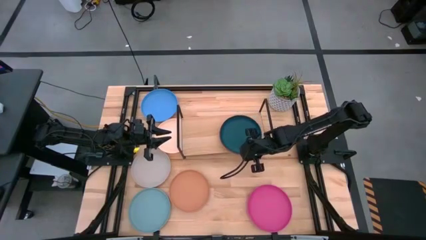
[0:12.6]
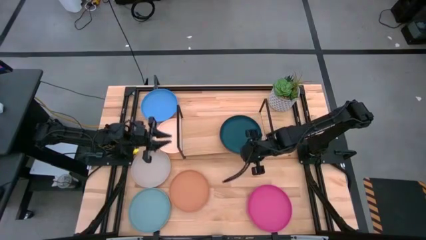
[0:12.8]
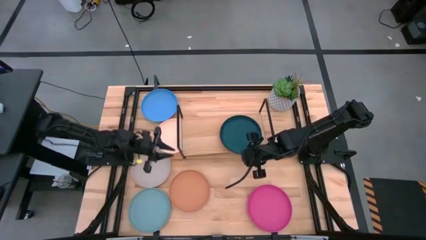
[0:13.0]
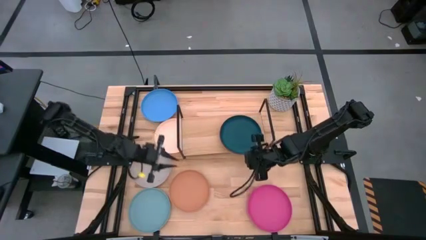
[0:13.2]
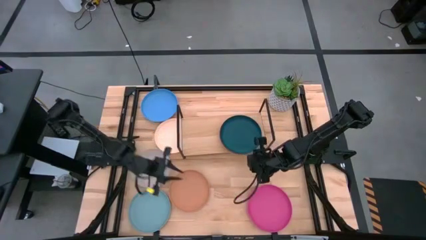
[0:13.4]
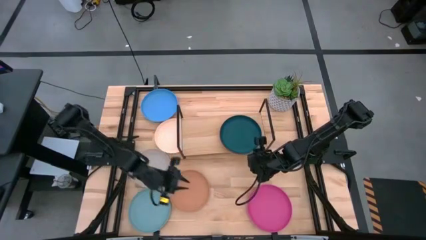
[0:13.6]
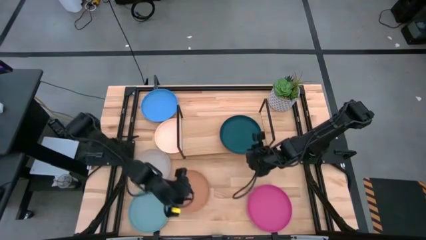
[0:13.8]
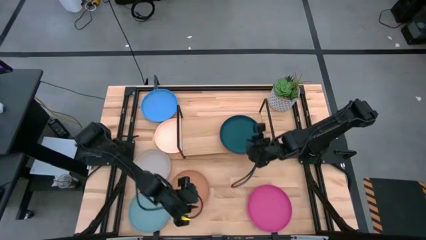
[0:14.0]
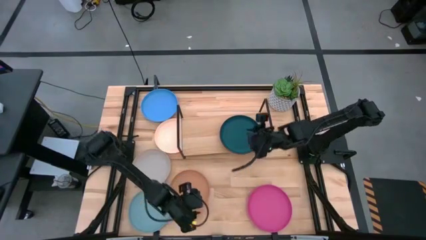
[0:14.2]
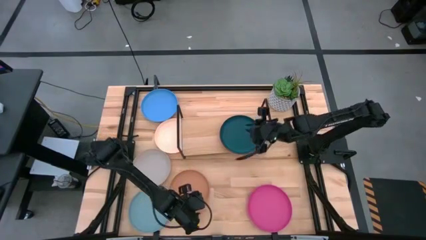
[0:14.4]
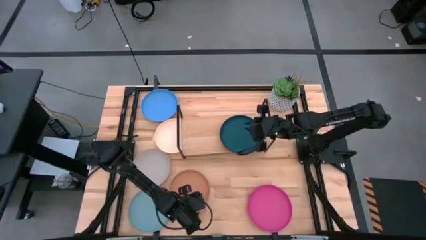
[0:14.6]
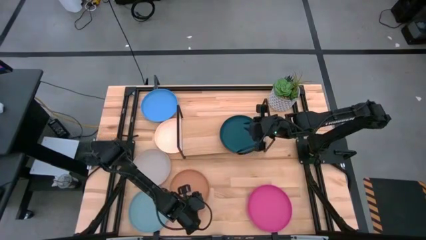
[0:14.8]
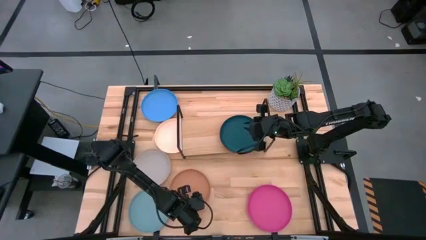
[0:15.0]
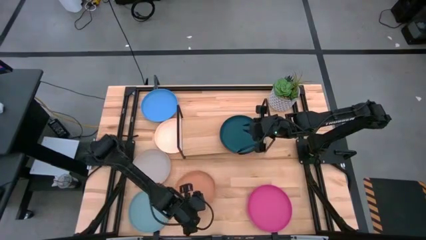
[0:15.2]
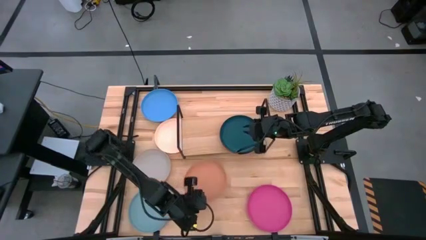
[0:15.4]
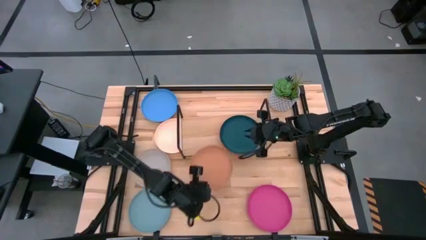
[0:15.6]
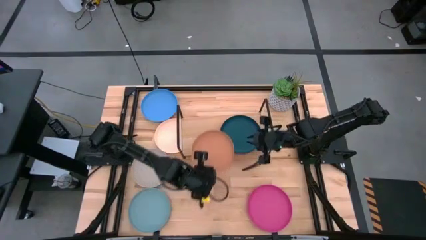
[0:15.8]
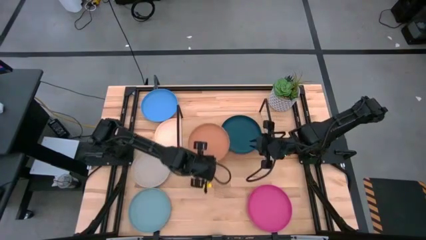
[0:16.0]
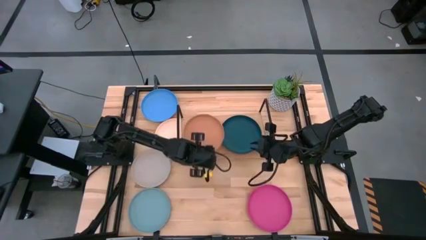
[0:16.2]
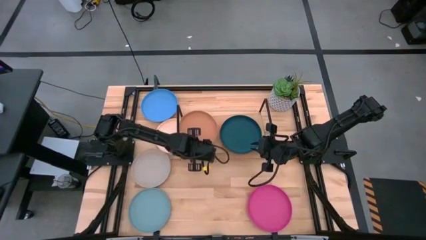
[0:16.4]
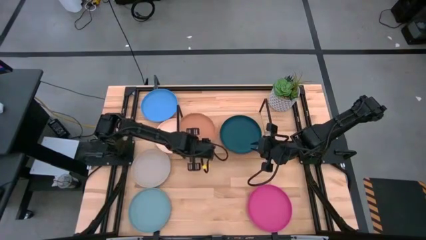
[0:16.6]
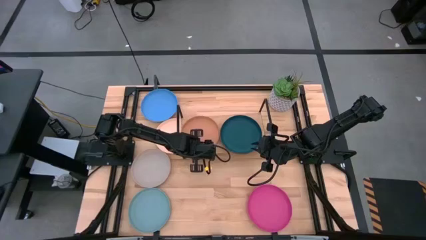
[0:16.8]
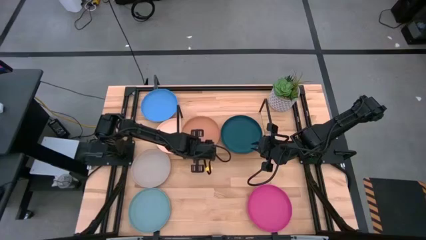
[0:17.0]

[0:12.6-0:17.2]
Task: Place and stack plates onto a shelf
Put the brown plate on the shelf

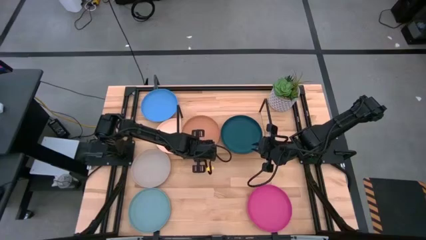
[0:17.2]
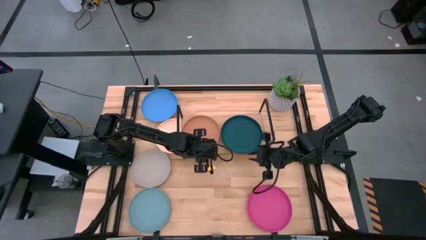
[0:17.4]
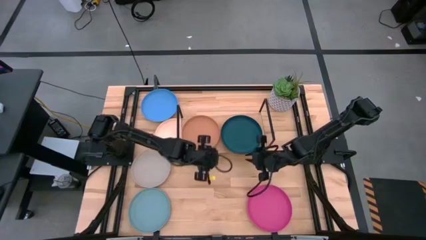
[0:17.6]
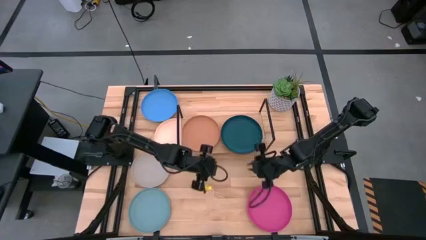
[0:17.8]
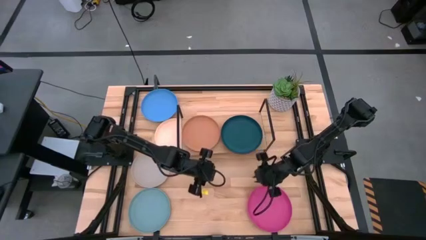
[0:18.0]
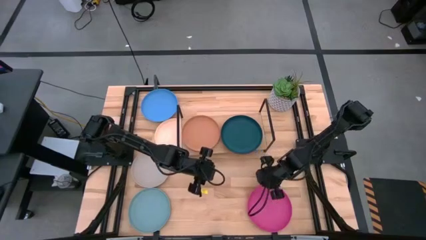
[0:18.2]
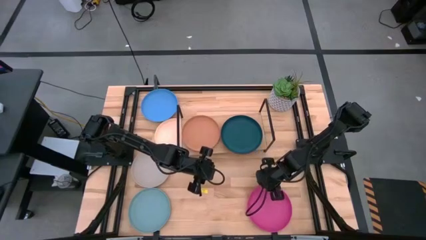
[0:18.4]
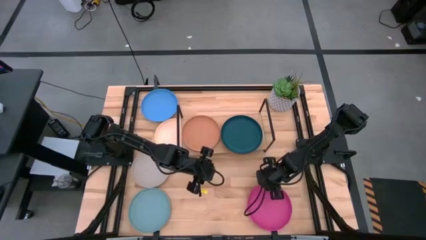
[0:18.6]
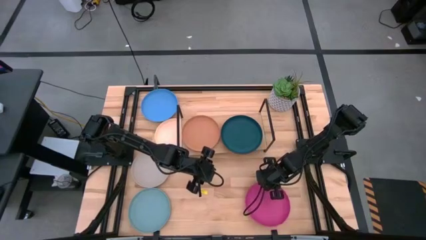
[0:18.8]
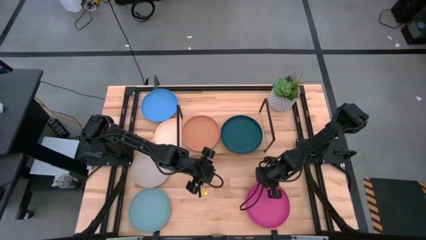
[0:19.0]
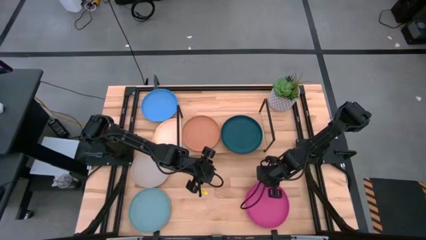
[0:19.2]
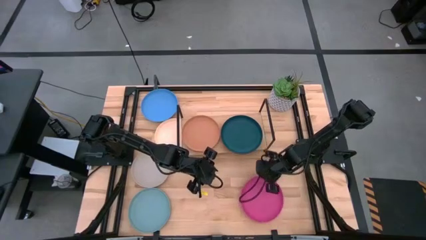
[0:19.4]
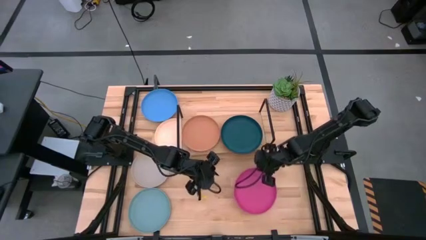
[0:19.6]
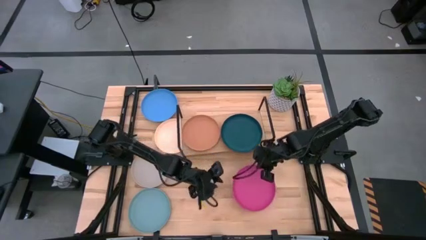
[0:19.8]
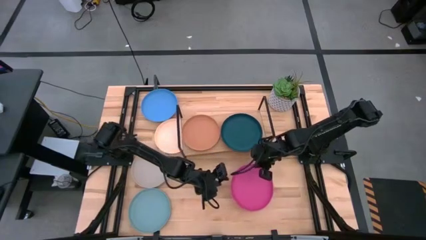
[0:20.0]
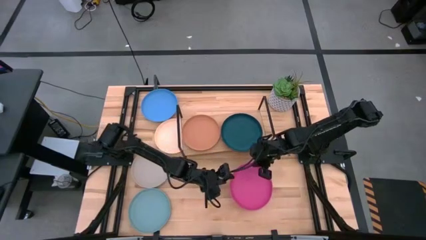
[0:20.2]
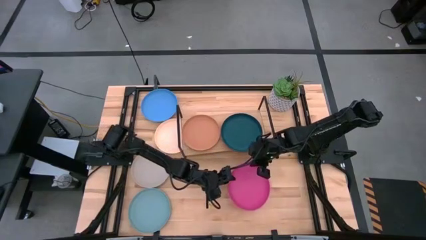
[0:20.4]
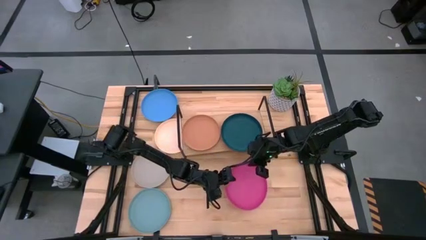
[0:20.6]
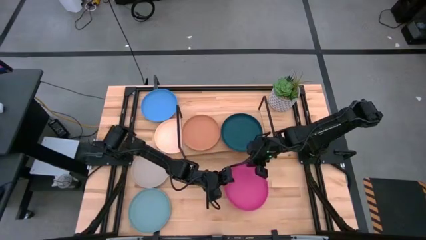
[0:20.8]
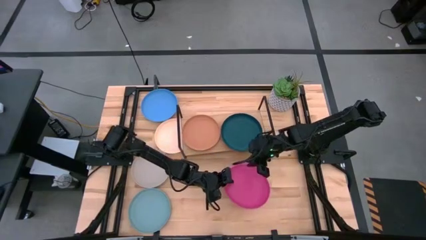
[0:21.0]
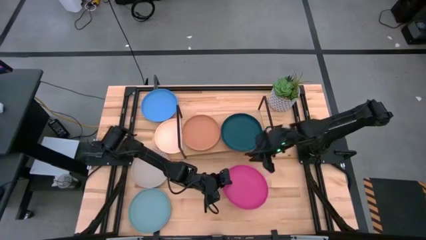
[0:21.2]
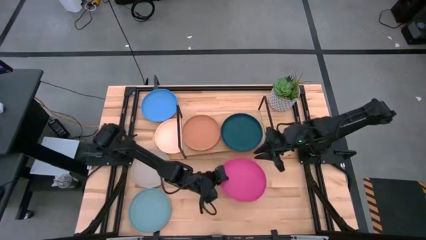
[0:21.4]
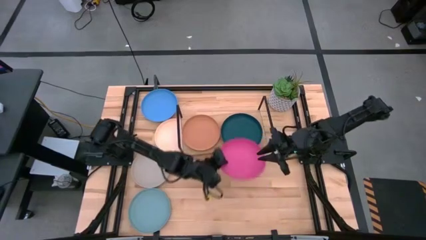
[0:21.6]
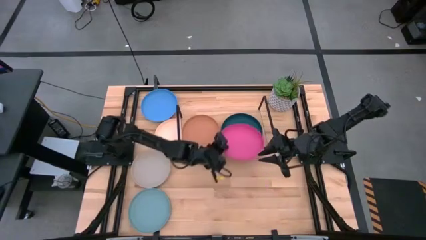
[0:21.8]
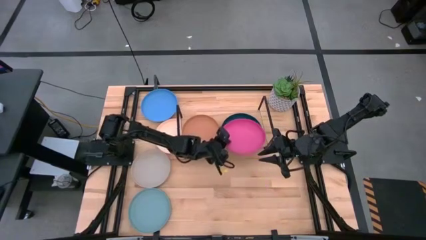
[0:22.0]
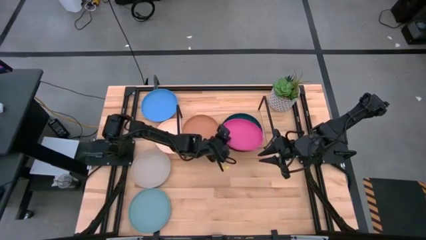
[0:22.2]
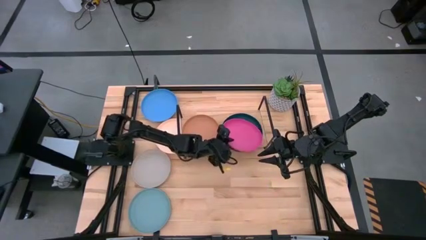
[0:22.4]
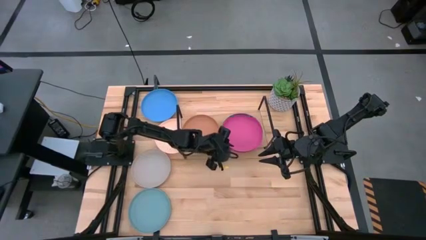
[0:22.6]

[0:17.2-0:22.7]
Stack the pink plate on top of the dark green plate on the shelf

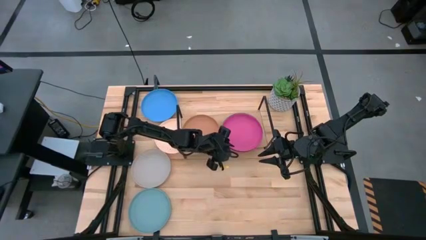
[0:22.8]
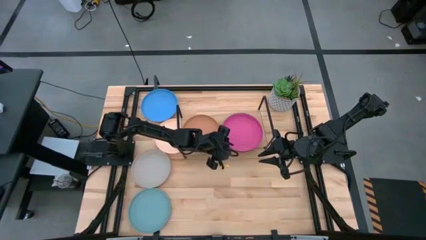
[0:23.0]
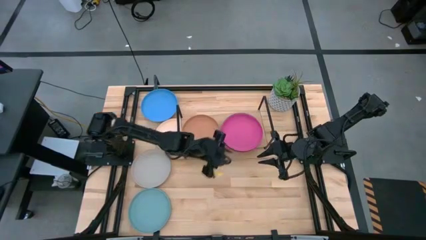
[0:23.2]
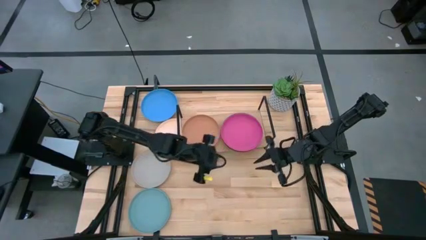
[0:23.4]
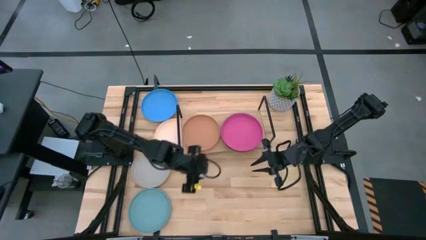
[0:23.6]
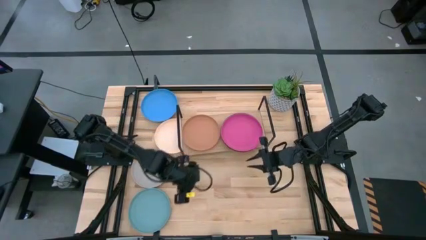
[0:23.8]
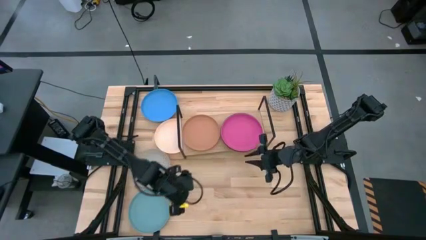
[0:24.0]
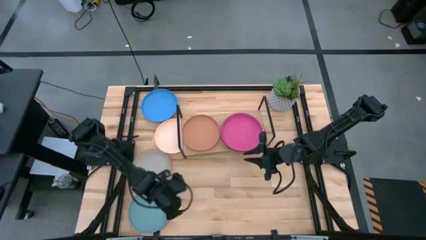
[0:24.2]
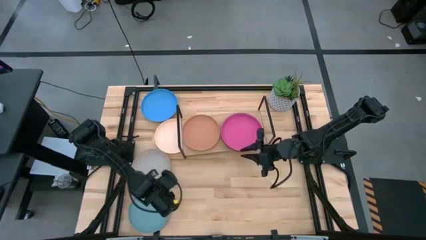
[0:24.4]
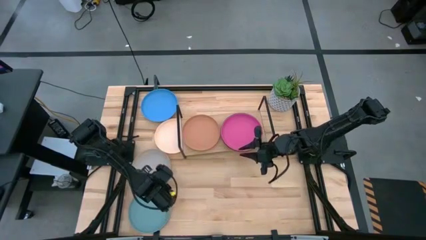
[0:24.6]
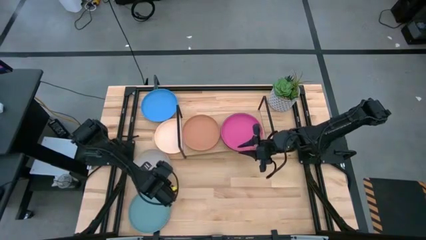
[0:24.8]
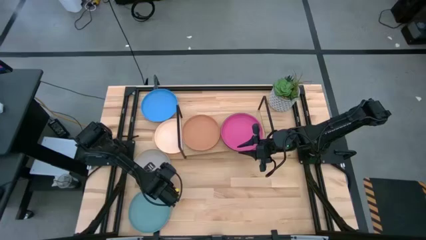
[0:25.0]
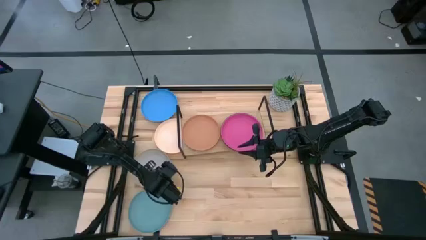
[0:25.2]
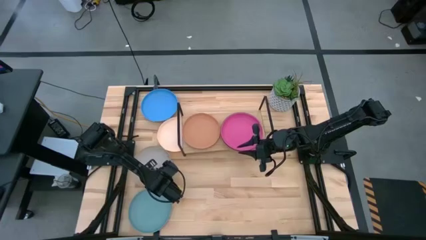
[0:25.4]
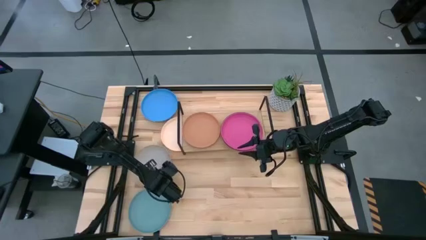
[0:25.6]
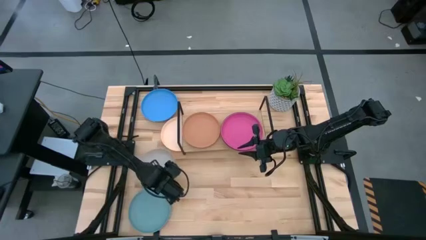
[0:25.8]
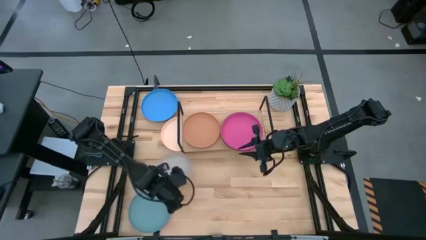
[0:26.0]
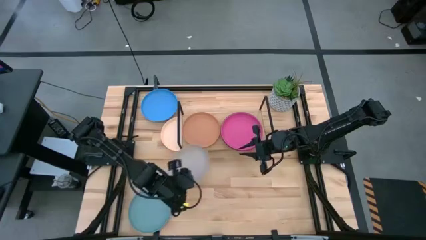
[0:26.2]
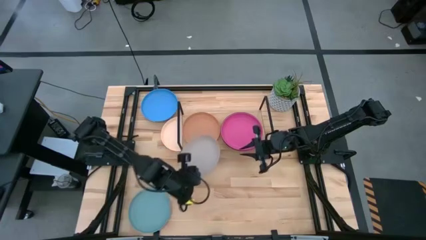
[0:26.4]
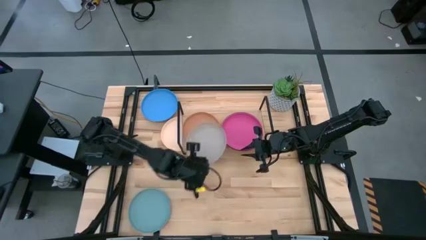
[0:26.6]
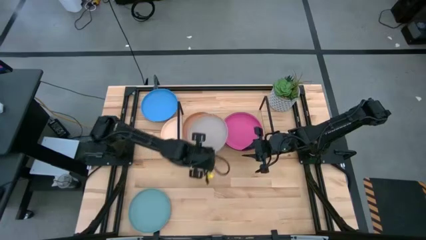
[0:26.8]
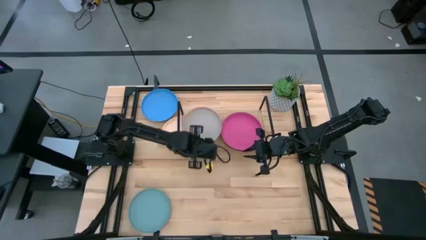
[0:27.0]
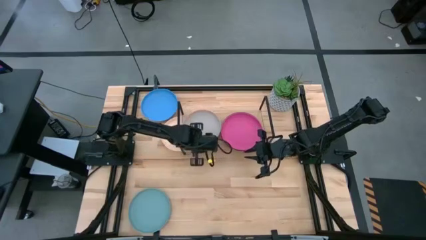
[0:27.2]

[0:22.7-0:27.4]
Stack the gray plate on top of the brown plate on the shelf

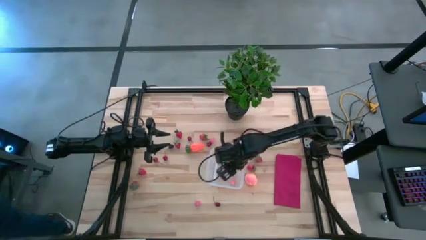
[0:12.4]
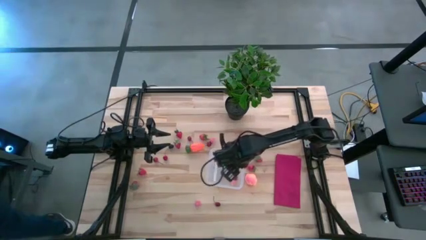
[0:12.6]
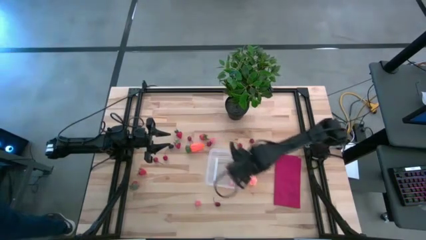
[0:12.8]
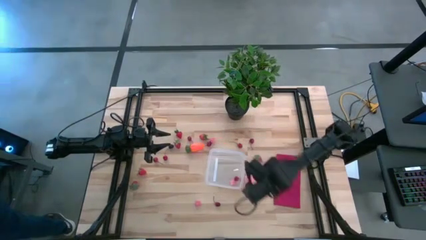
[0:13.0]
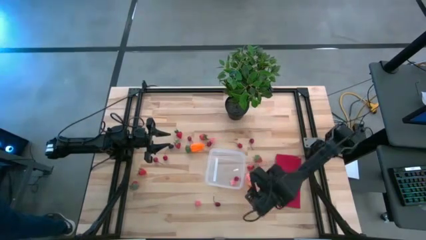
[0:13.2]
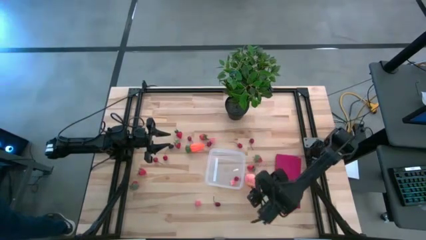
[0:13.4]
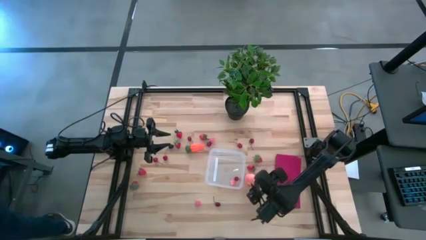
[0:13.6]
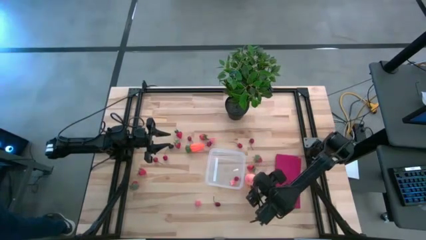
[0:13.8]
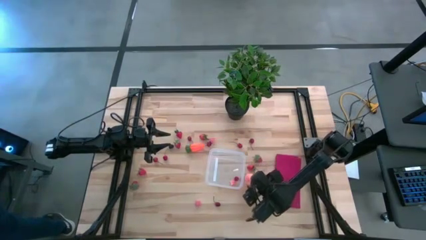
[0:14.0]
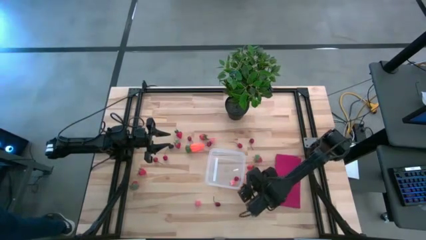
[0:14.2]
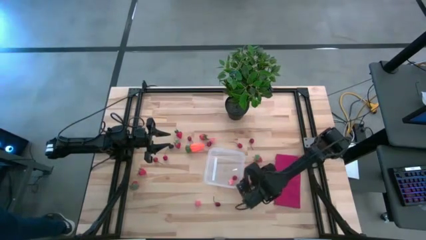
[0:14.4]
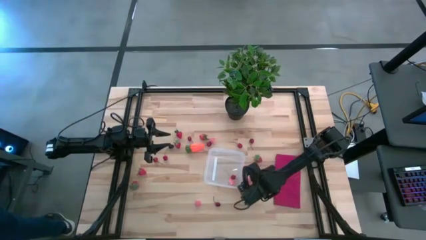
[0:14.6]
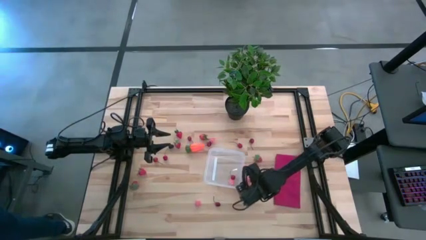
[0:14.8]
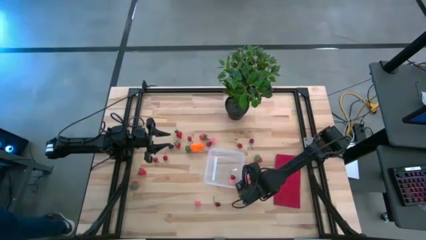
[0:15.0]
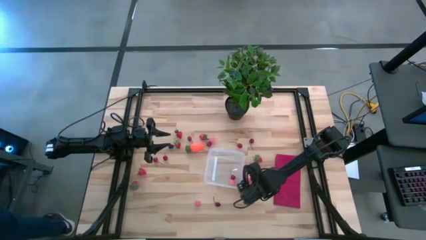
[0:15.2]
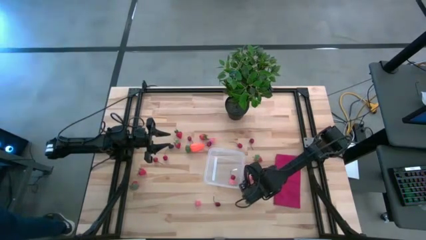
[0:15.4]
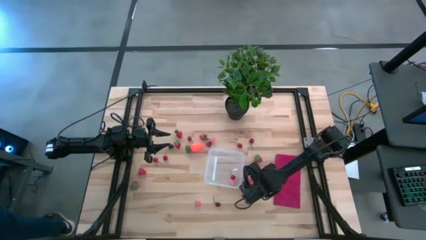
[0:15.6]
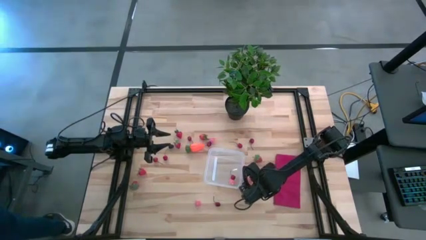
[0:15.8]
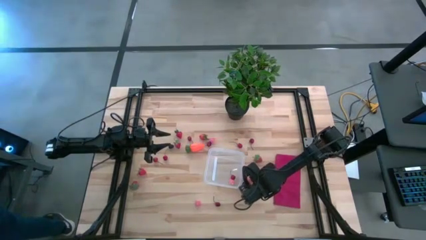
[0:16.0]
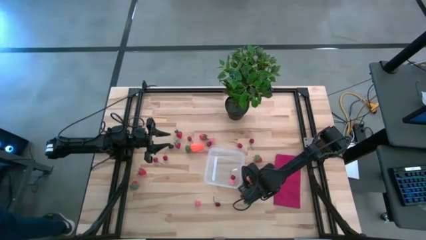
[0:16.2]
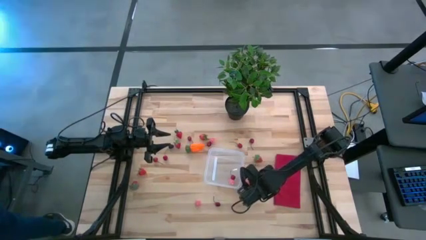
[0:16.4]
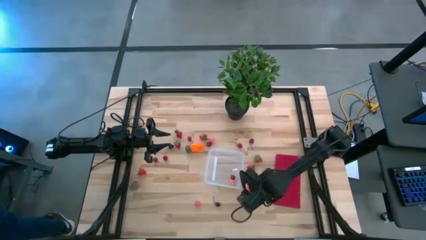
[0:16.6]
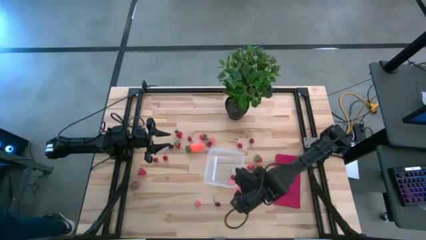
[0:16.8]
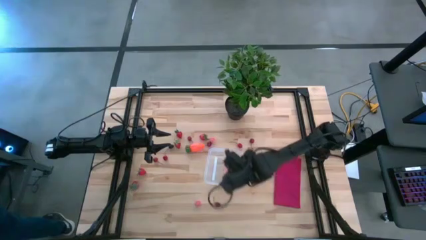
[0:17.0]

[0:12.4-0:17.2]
Task: Pick and placing Produce into tupperware
Put the pink peach into the transparent bin
